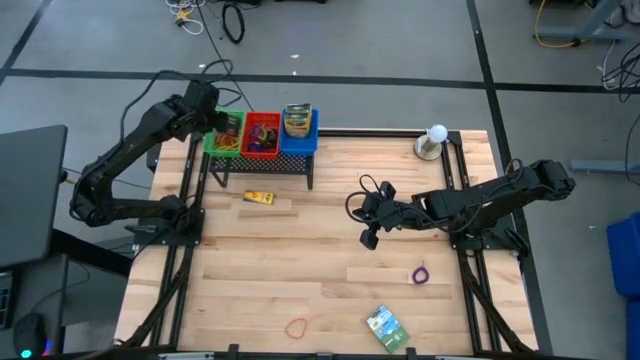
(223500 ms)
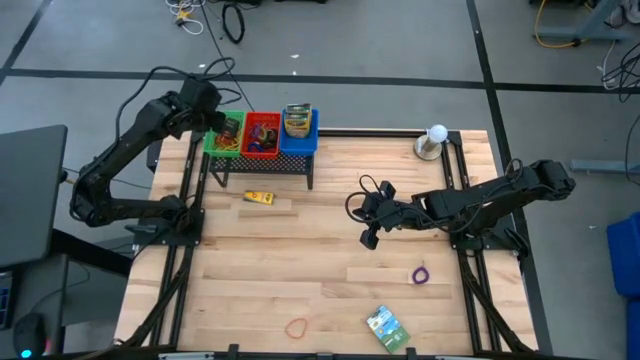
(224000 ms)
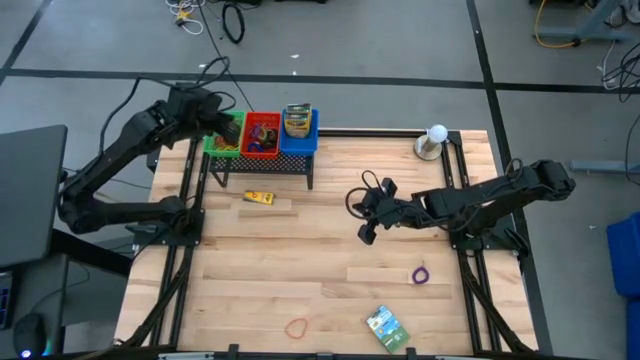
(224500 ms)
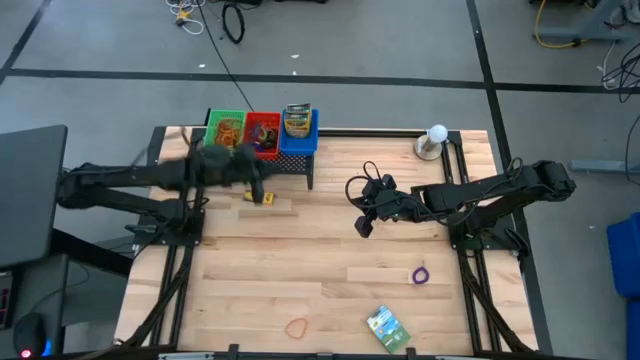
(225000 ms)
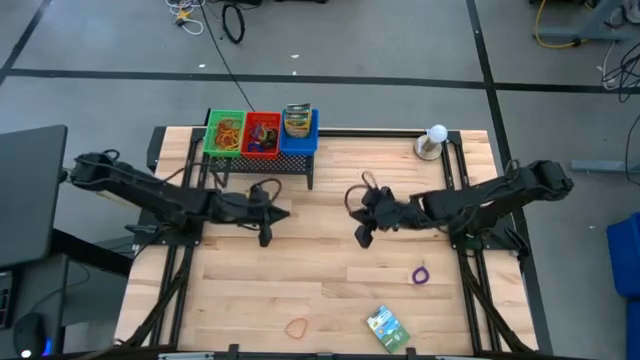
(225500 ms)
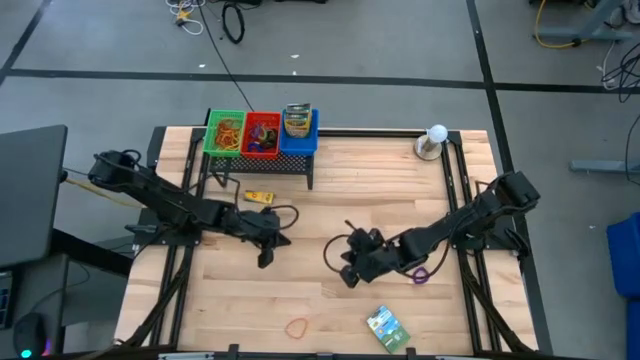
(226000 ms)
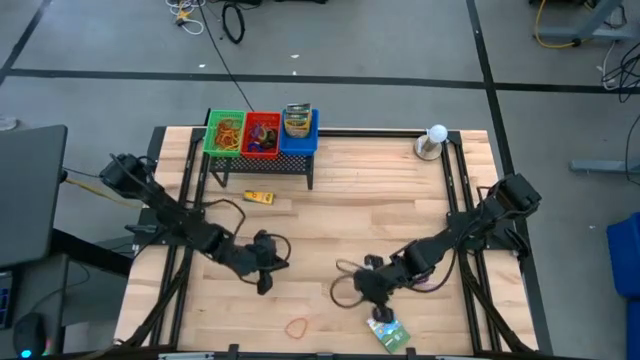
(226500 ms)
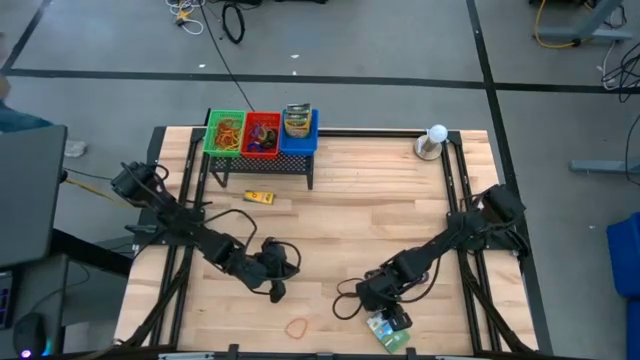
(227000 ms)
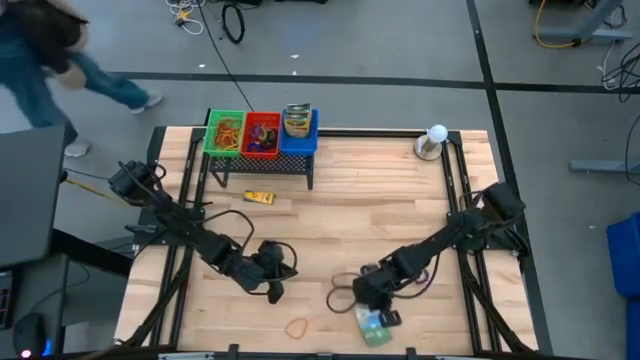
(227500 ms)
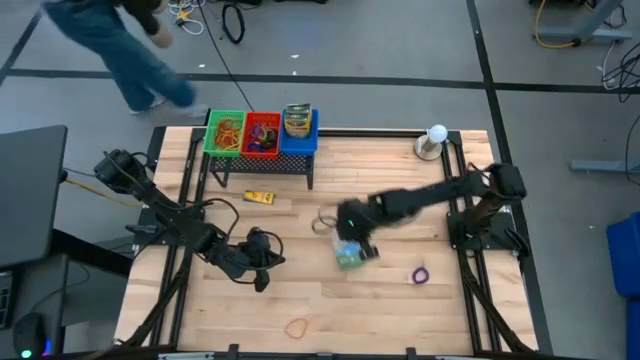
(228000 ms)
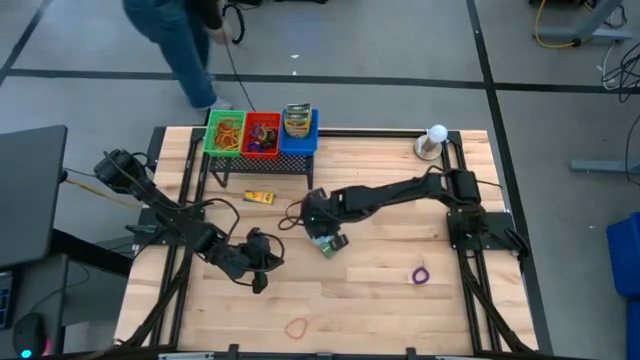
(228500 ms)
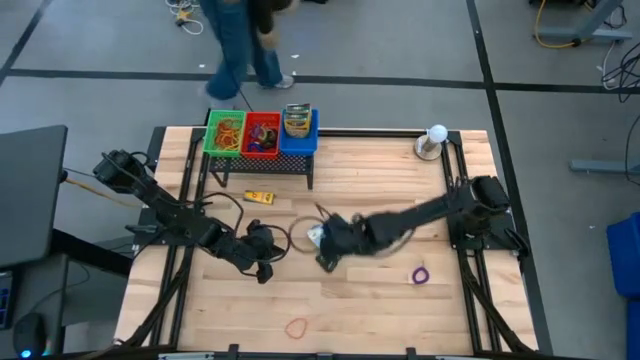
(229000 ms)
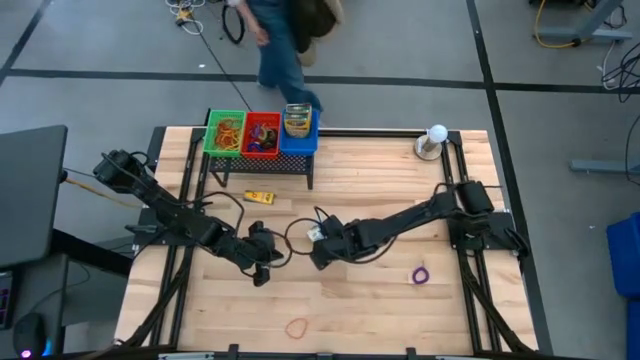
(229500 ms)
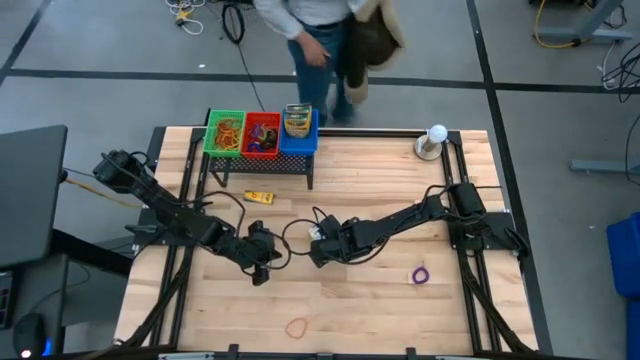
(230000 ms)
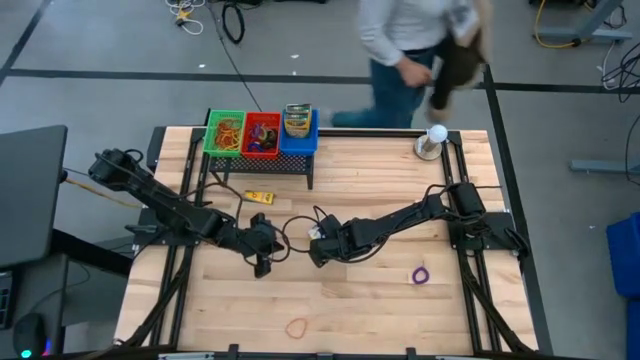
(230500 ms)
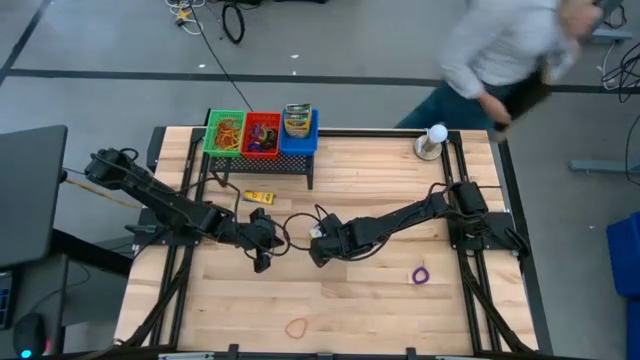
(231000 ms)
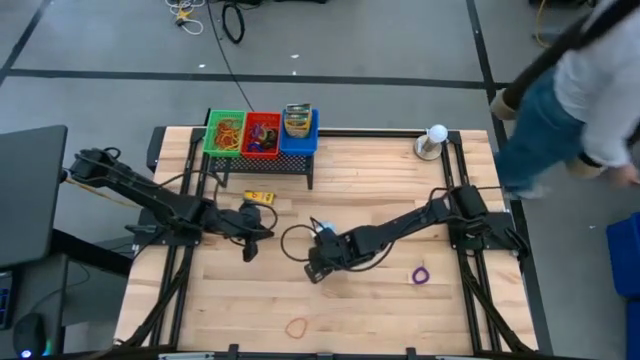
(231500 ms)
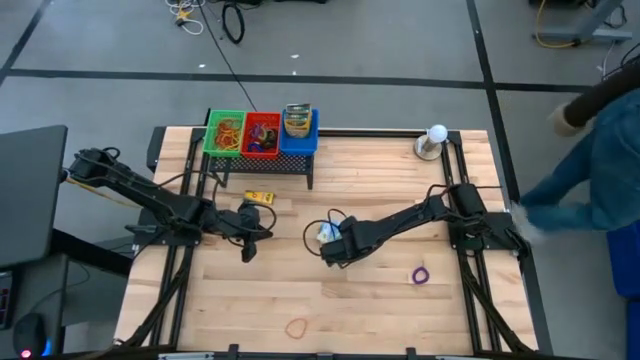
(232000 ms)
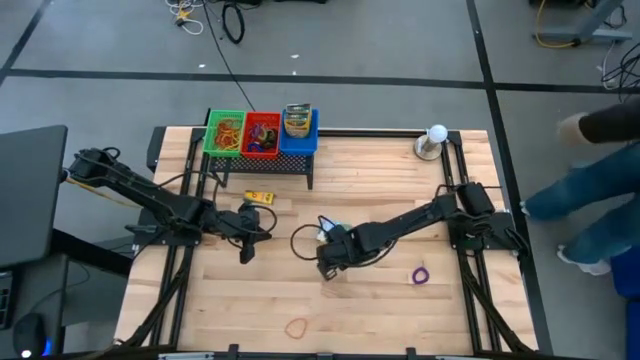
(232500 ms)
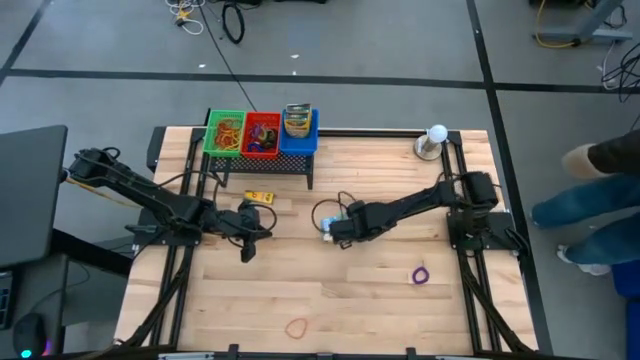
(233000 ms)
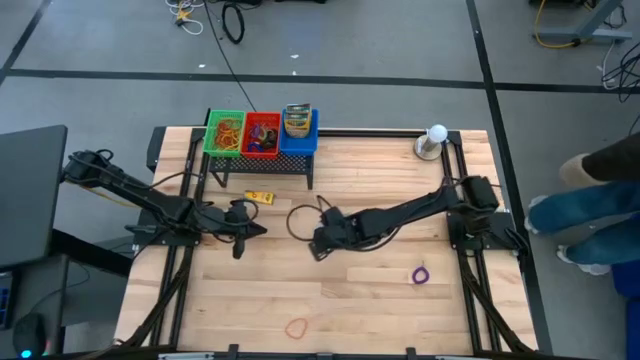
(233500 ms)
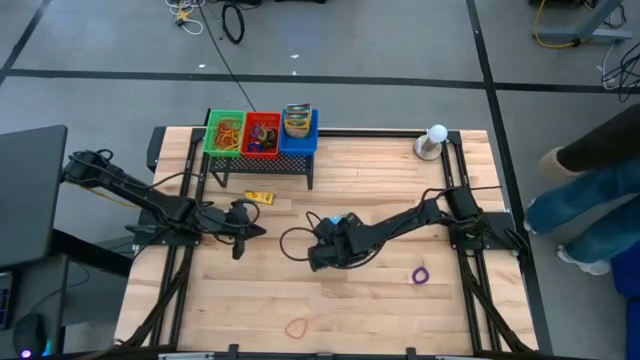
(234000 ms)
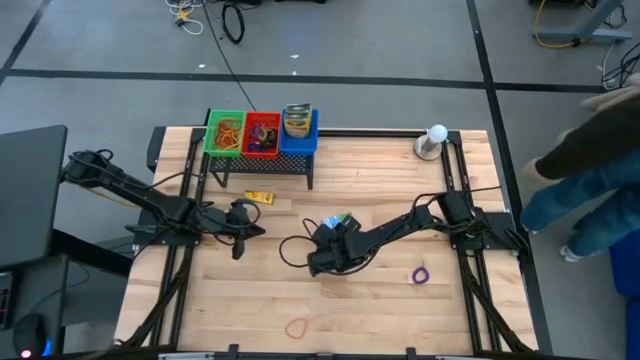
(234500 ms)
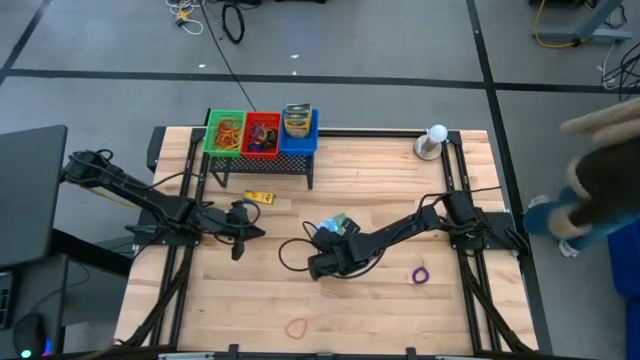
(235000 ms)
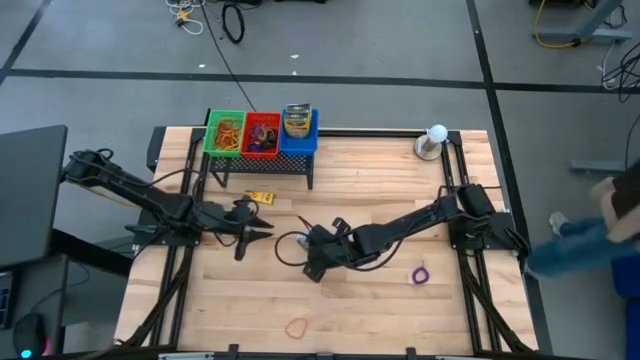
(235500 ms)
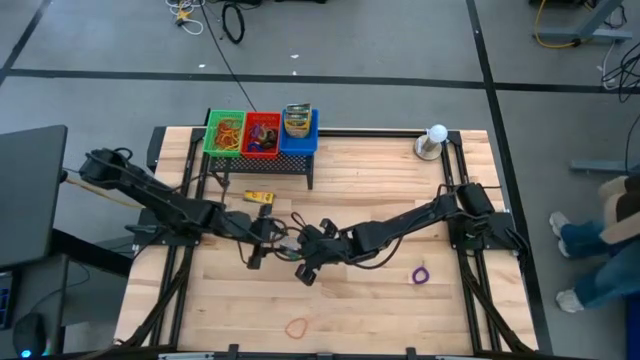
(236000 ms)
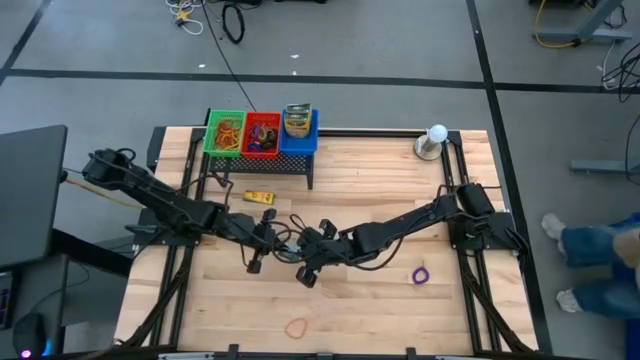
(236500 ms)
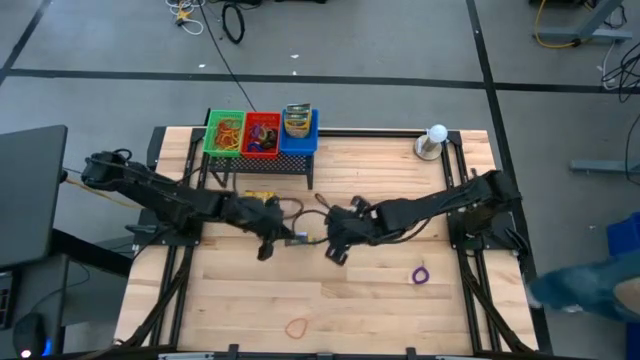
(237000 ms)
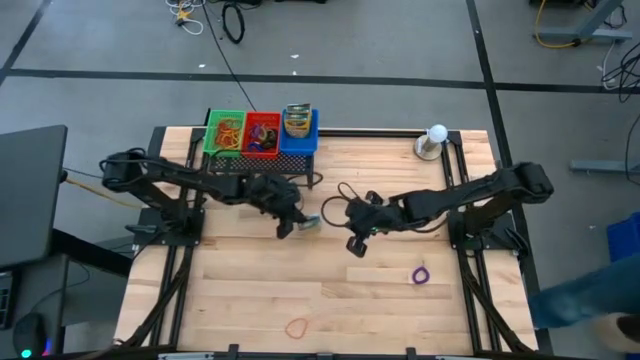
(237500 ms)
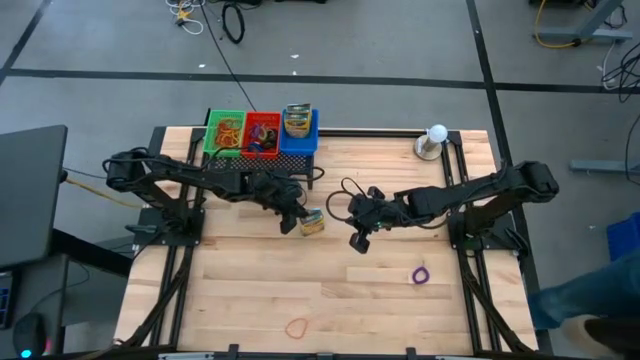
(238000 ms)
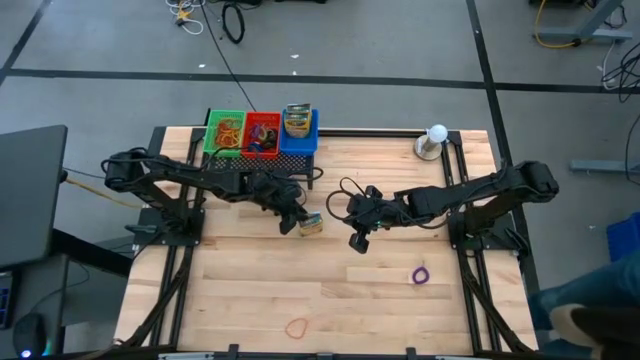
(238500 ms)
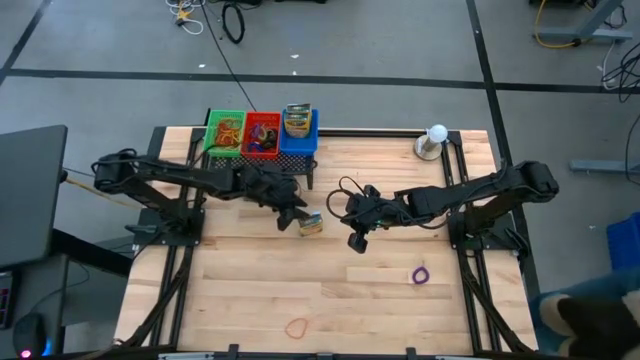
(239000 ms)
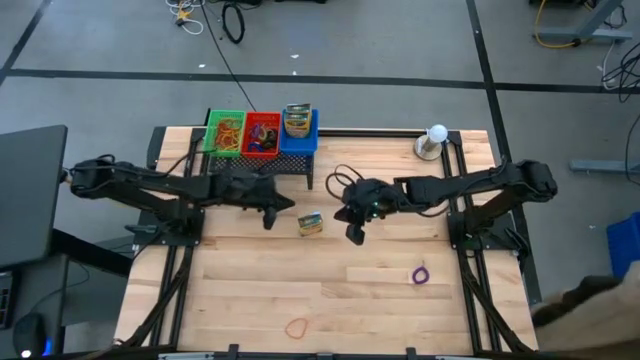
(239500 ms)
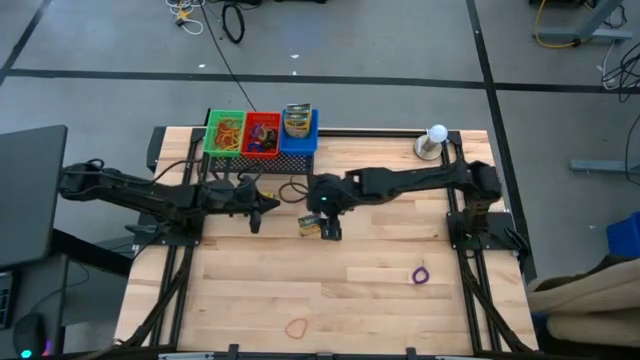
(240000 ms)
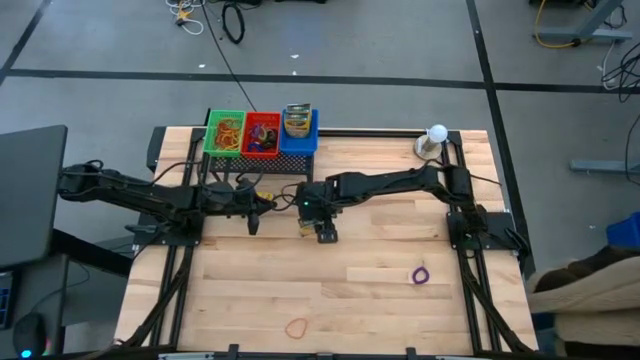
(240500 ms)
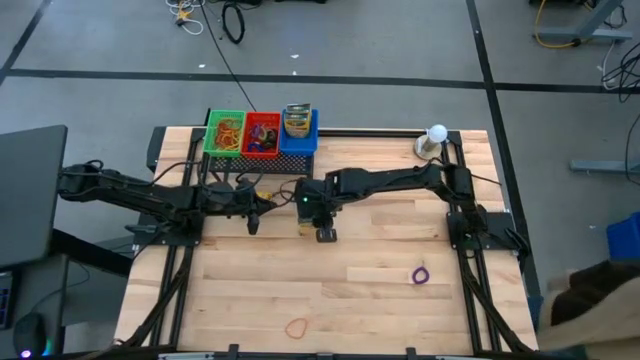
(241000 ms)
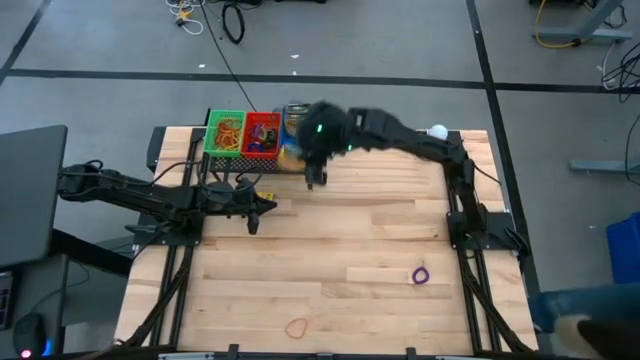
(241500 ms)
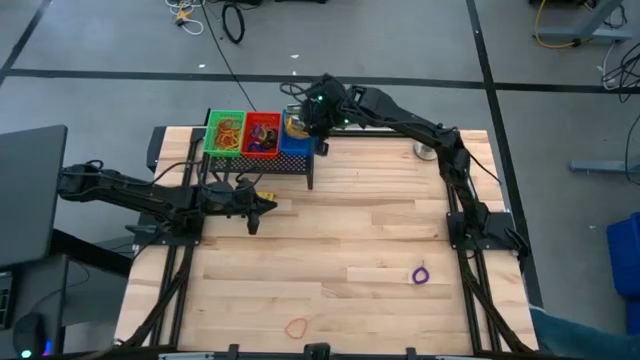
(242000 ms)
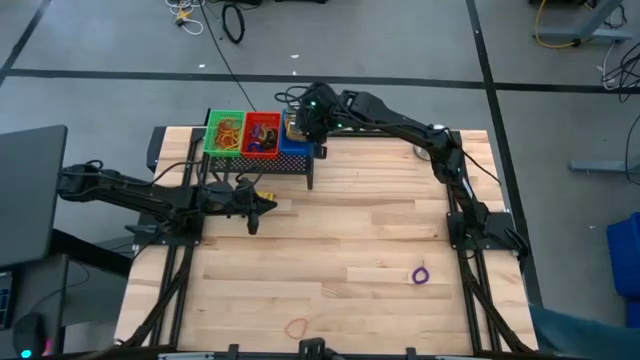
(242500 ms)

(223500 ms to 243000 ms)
Task: Pick & Place Office Desk Supplies
Put the big box of crayons into the blue bin on the shelf

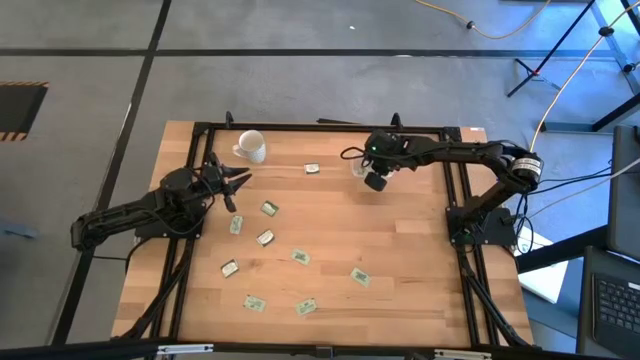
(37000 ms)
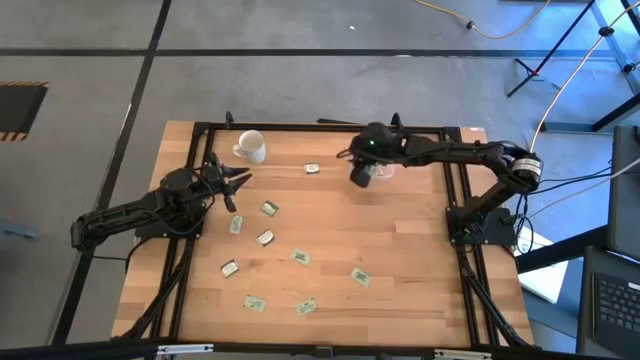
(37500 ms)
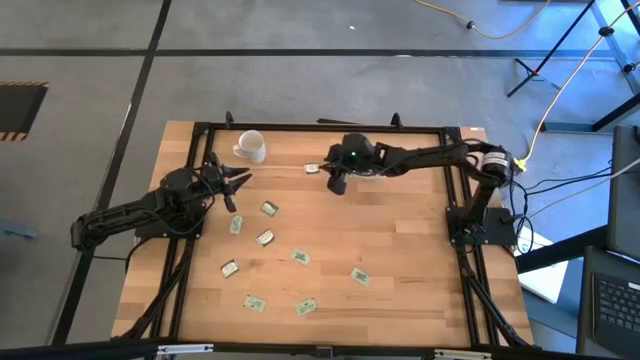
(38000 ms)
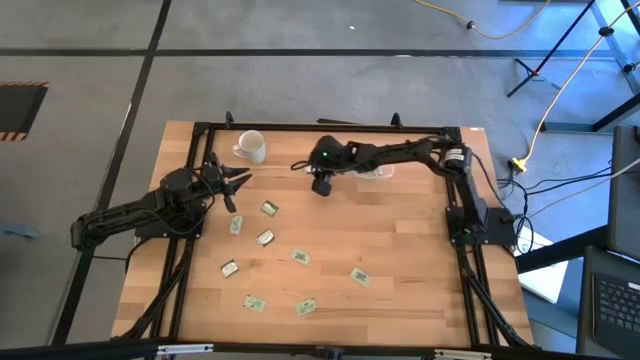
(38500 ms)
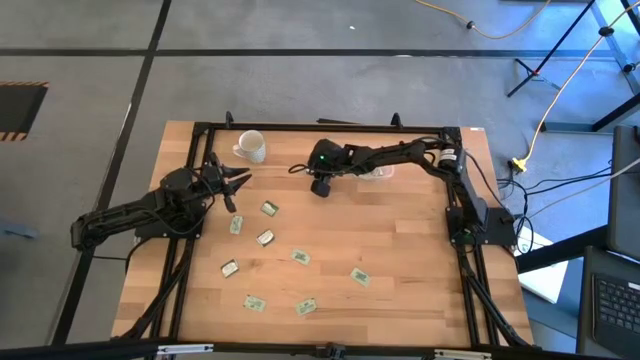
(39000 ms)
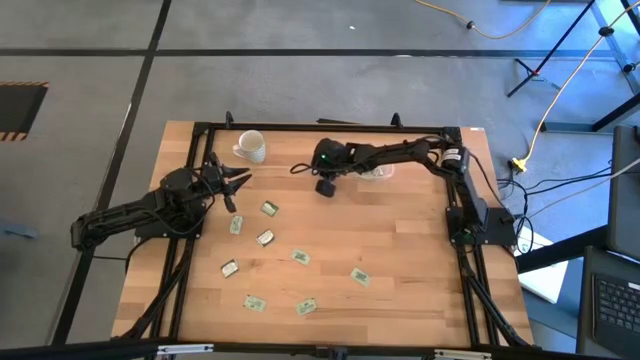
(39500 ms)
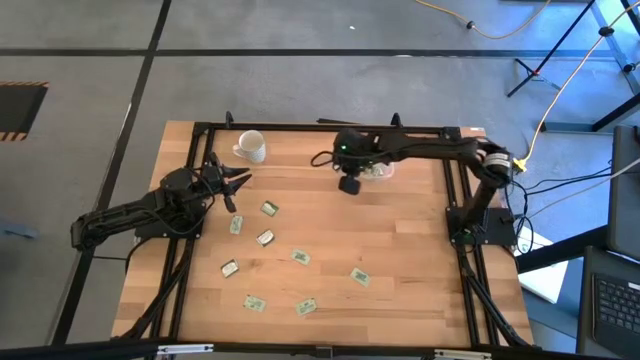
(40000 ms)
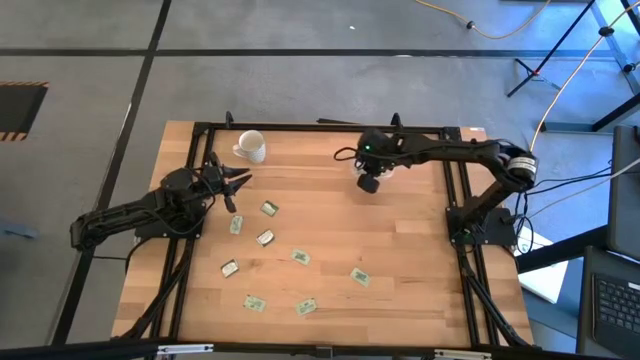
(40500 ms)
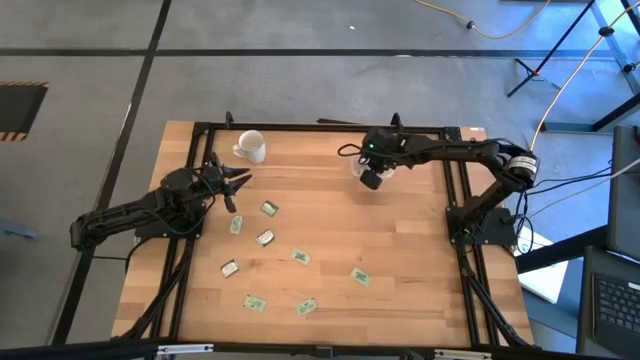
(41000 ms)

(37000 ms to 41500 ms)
Task: Pick and place items into bin
Put the truvia packet into the transparent bin
